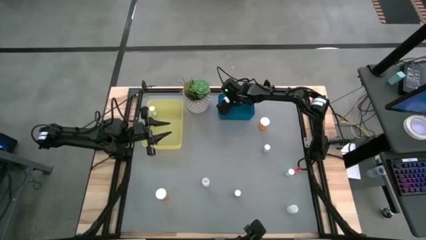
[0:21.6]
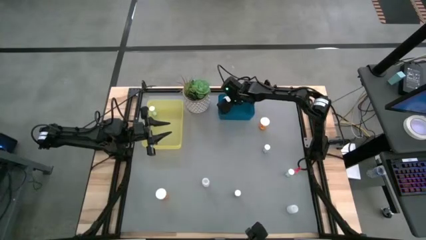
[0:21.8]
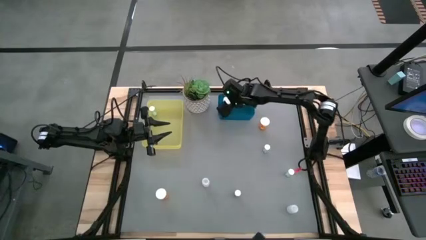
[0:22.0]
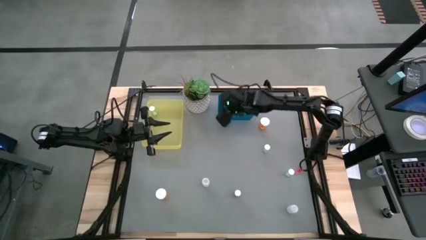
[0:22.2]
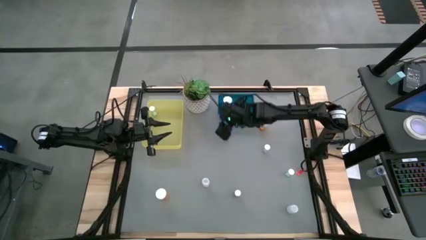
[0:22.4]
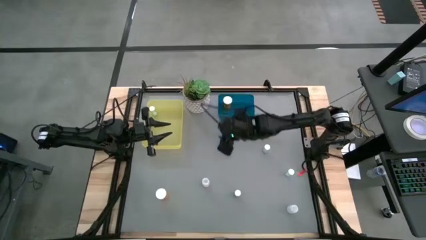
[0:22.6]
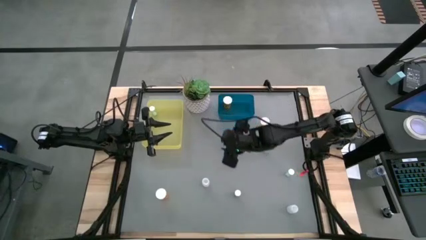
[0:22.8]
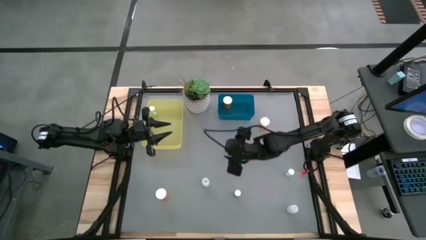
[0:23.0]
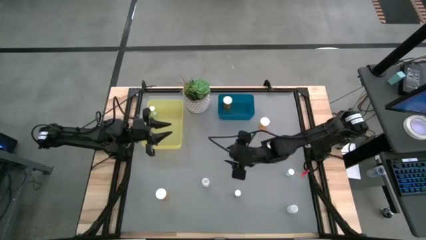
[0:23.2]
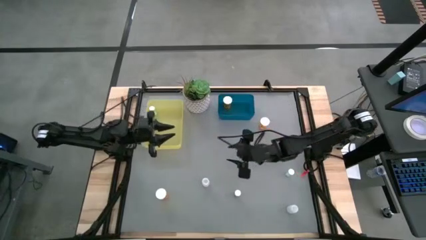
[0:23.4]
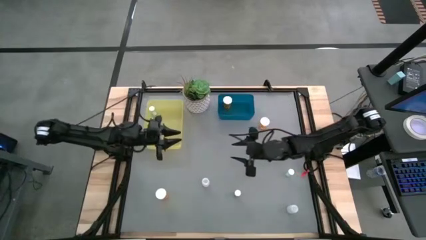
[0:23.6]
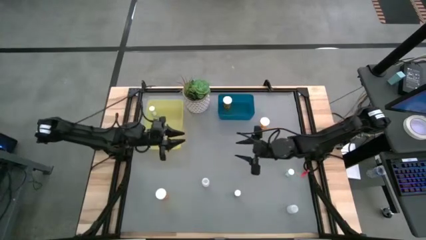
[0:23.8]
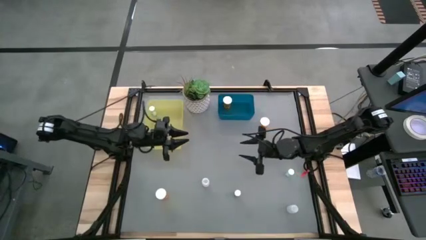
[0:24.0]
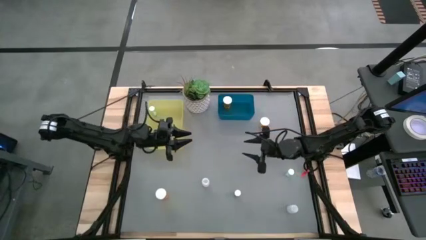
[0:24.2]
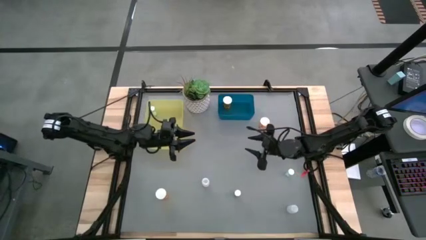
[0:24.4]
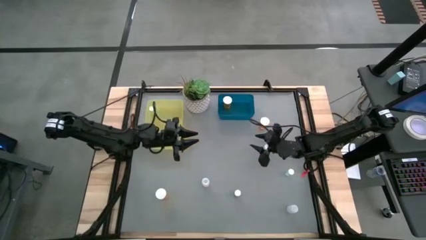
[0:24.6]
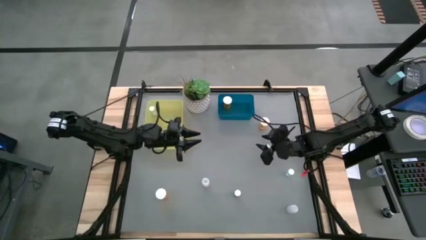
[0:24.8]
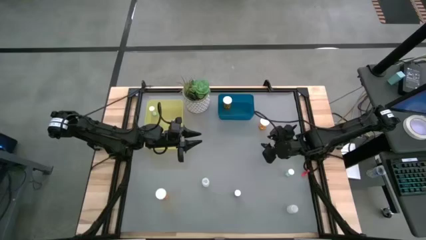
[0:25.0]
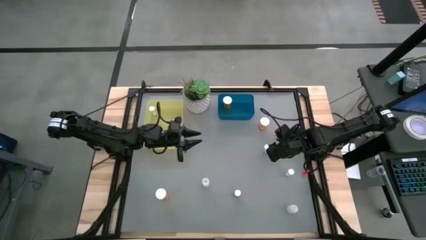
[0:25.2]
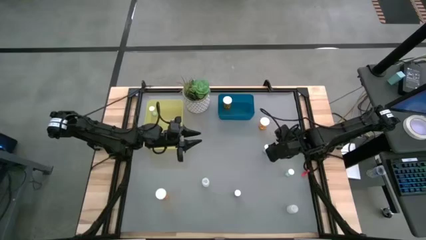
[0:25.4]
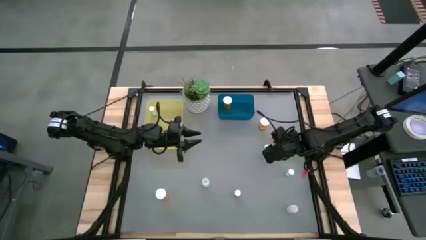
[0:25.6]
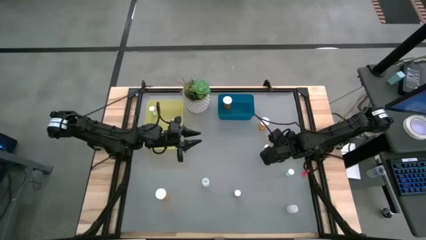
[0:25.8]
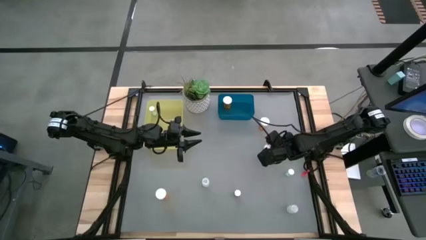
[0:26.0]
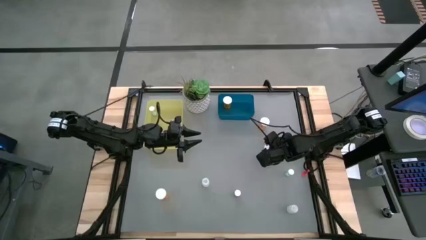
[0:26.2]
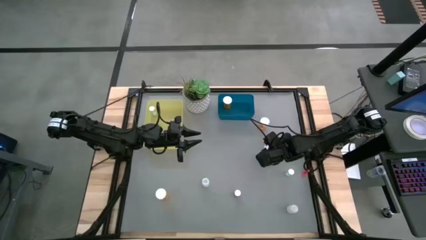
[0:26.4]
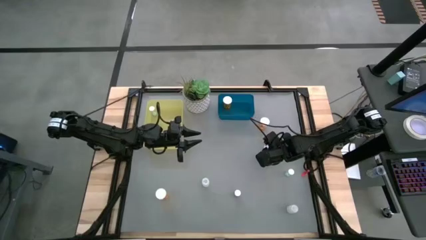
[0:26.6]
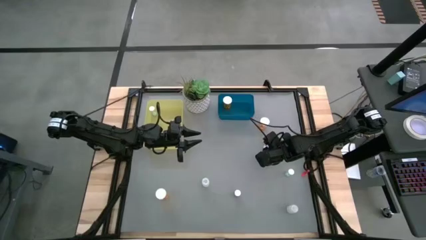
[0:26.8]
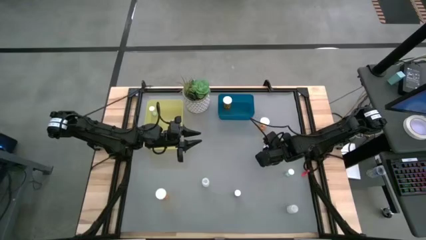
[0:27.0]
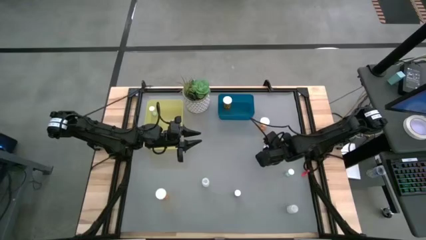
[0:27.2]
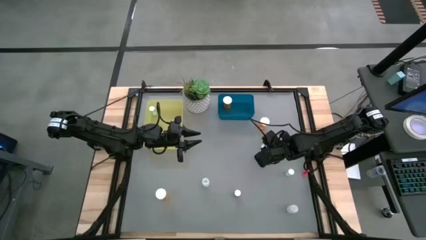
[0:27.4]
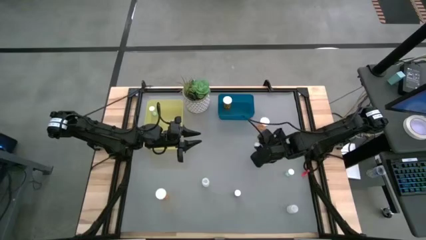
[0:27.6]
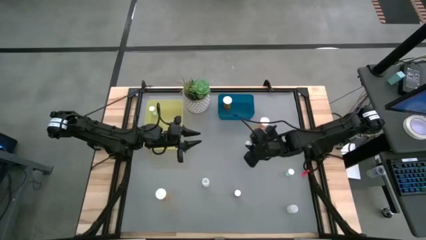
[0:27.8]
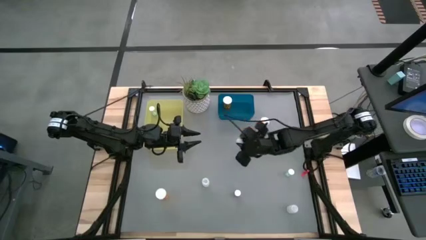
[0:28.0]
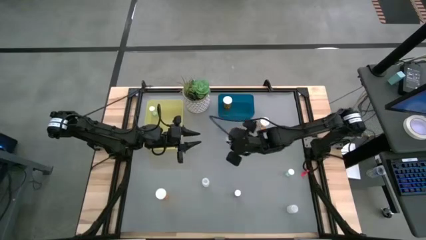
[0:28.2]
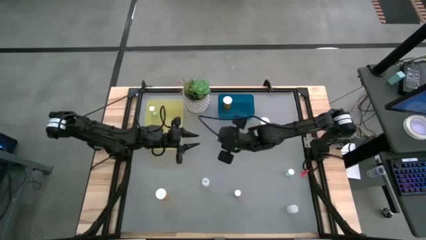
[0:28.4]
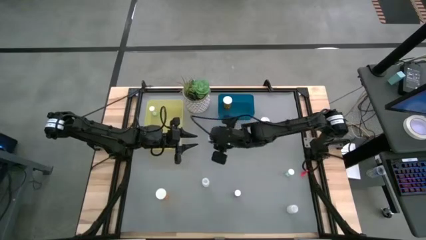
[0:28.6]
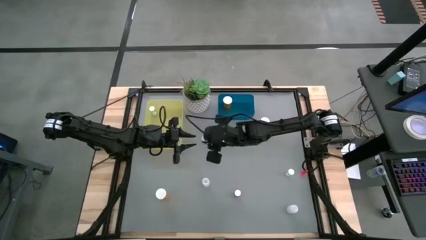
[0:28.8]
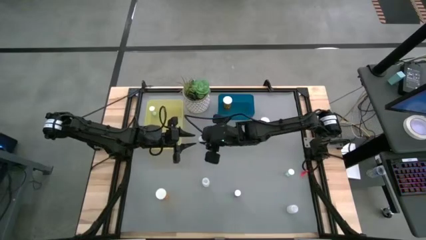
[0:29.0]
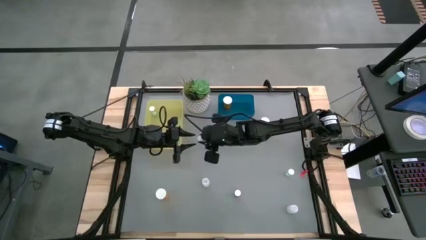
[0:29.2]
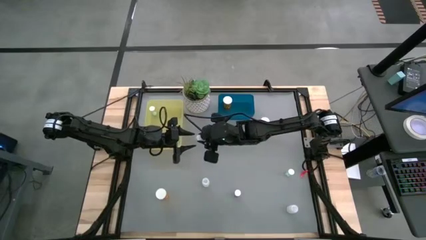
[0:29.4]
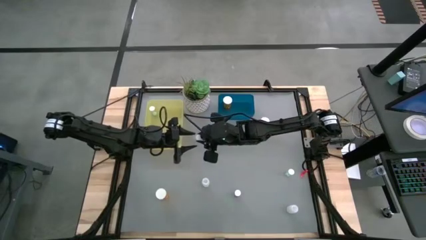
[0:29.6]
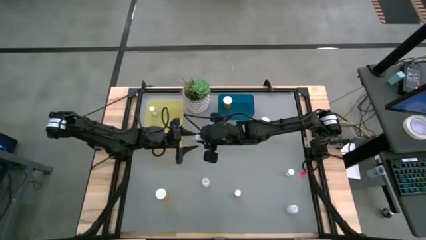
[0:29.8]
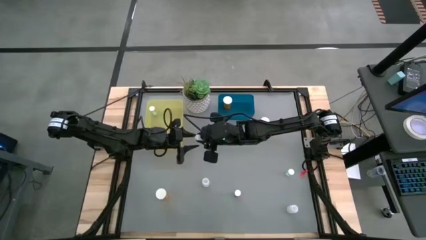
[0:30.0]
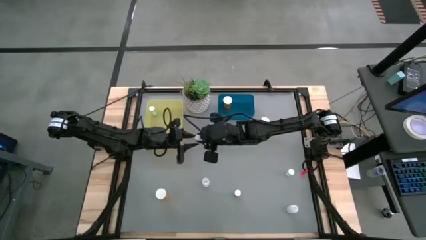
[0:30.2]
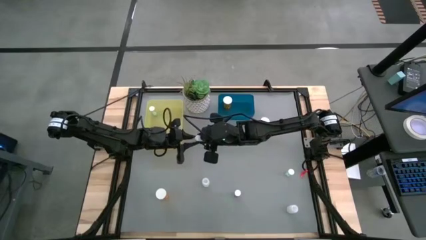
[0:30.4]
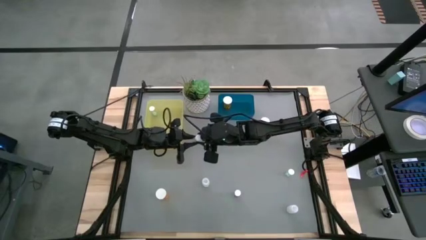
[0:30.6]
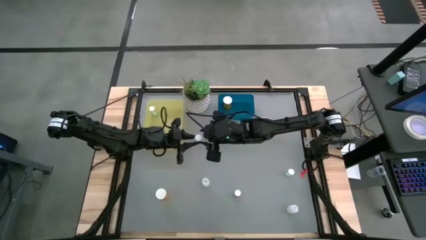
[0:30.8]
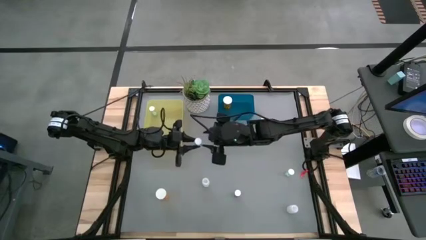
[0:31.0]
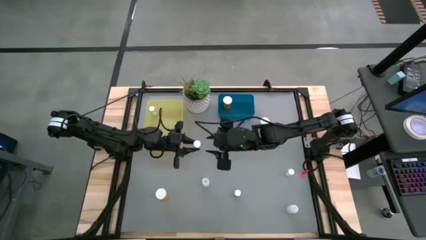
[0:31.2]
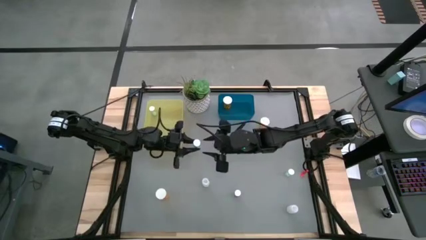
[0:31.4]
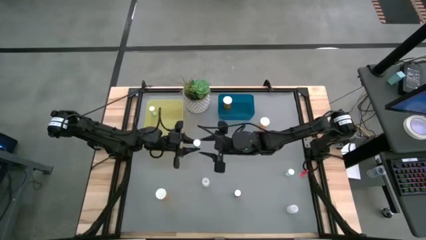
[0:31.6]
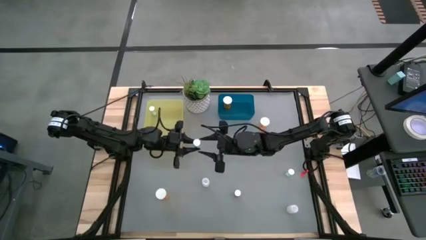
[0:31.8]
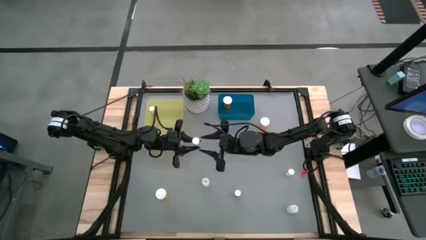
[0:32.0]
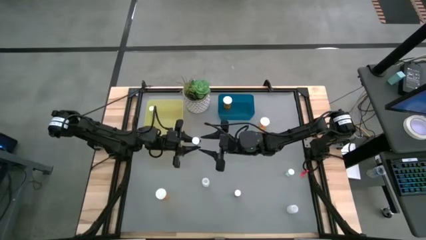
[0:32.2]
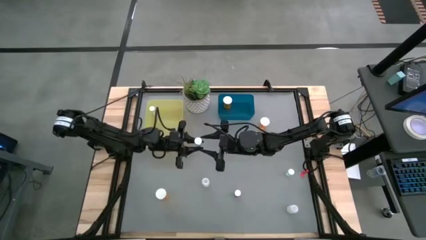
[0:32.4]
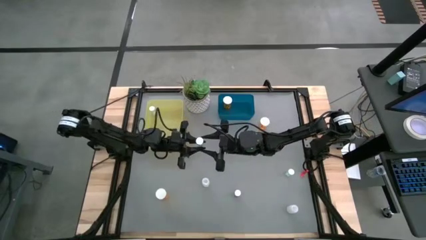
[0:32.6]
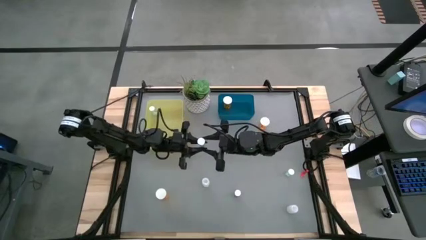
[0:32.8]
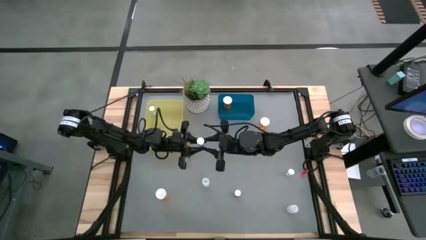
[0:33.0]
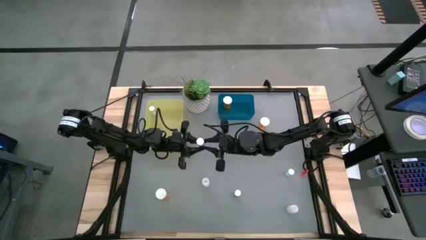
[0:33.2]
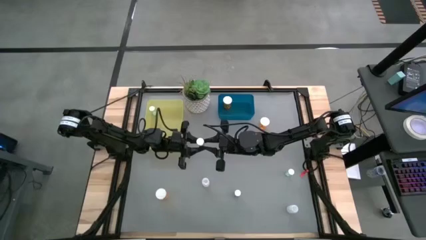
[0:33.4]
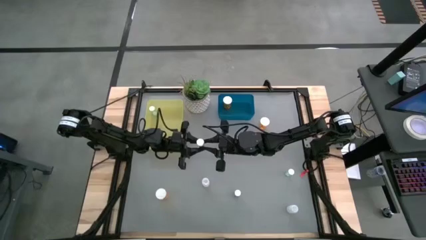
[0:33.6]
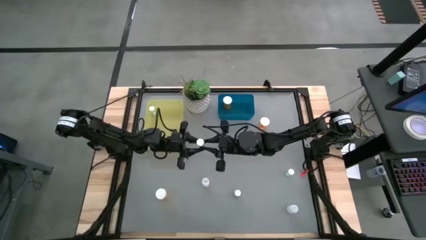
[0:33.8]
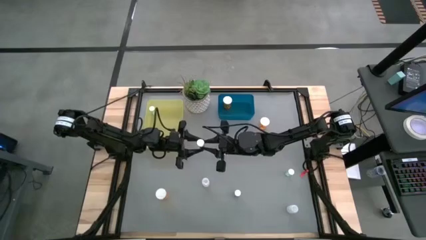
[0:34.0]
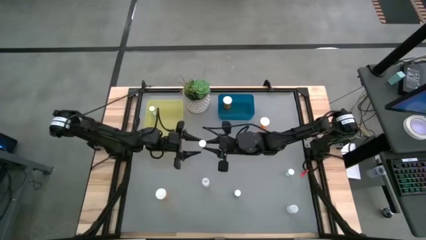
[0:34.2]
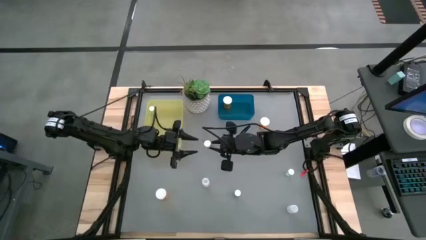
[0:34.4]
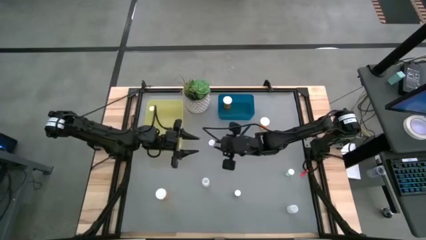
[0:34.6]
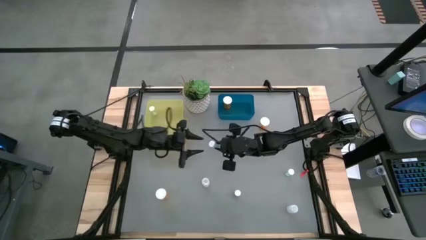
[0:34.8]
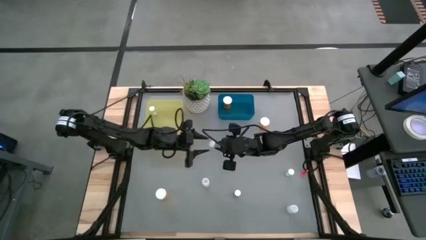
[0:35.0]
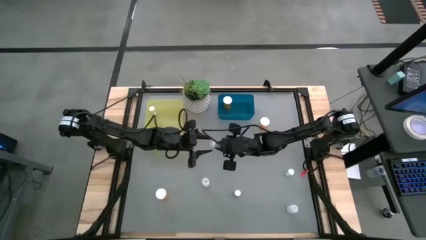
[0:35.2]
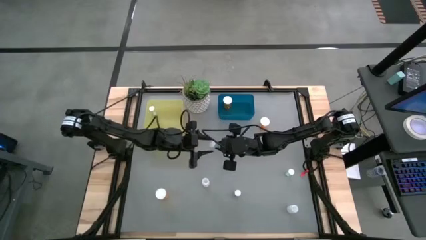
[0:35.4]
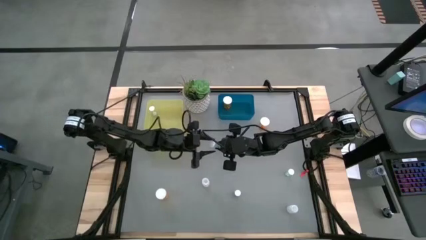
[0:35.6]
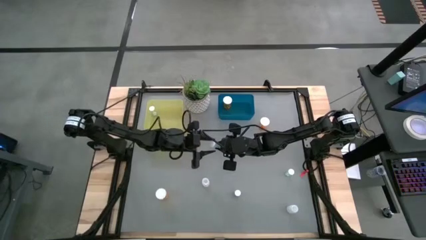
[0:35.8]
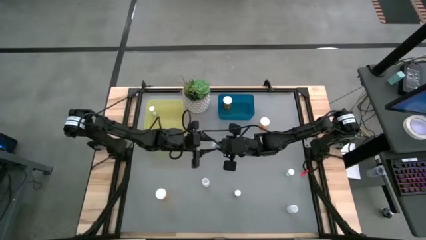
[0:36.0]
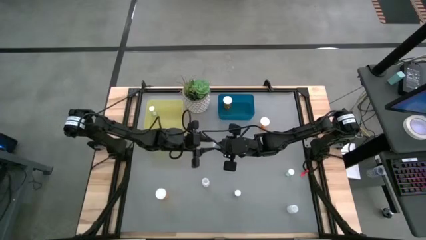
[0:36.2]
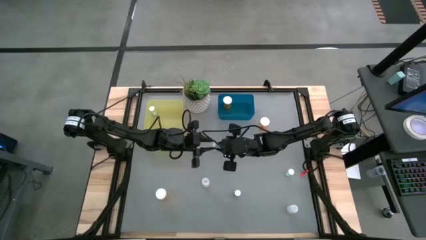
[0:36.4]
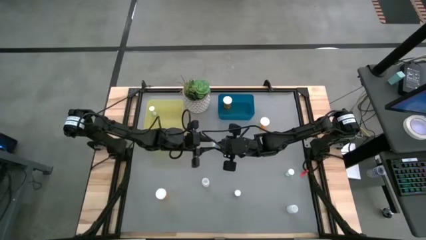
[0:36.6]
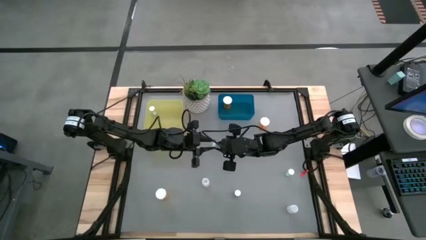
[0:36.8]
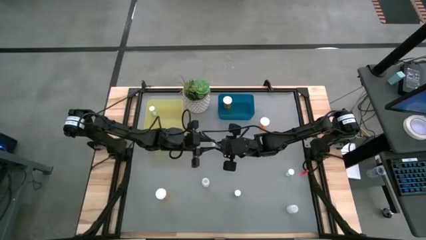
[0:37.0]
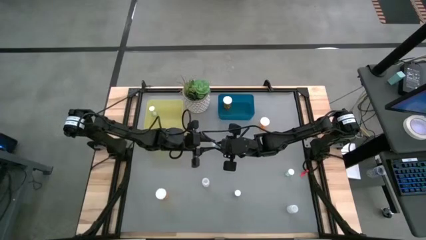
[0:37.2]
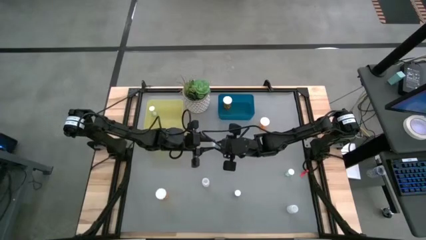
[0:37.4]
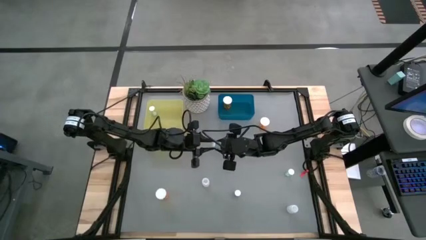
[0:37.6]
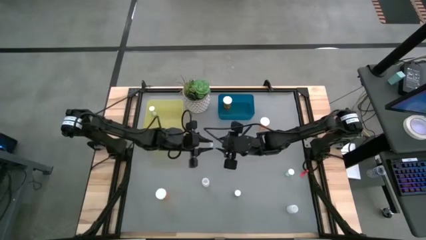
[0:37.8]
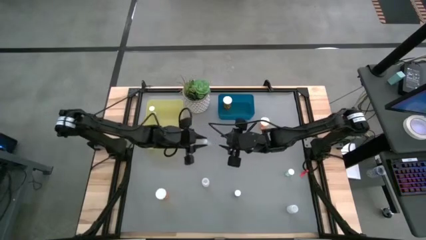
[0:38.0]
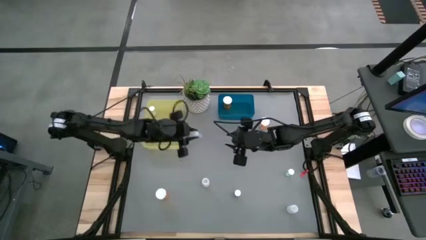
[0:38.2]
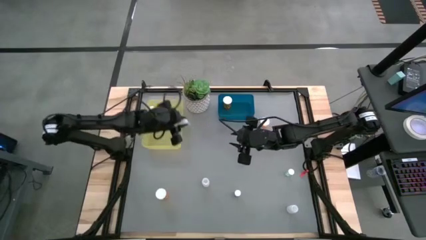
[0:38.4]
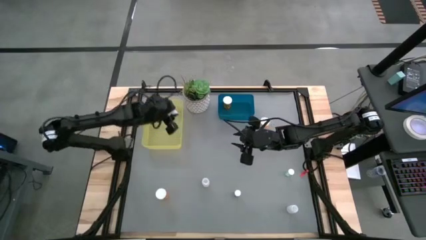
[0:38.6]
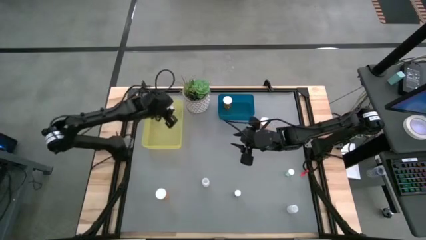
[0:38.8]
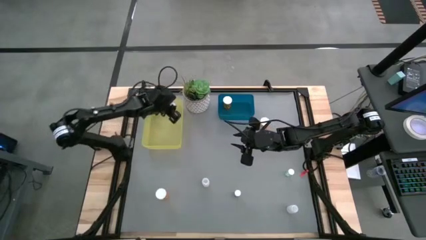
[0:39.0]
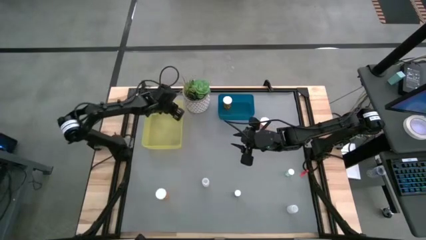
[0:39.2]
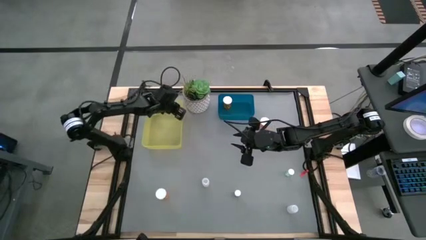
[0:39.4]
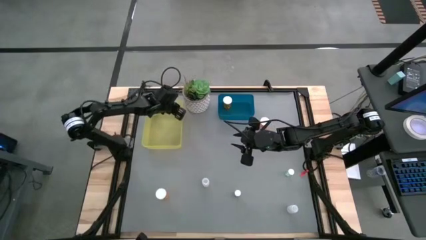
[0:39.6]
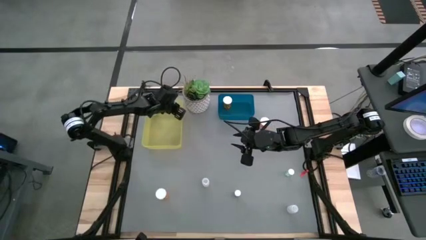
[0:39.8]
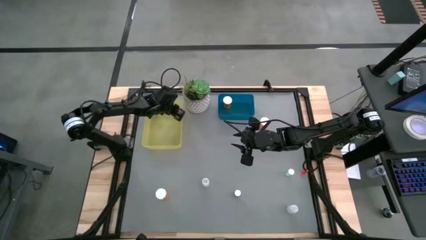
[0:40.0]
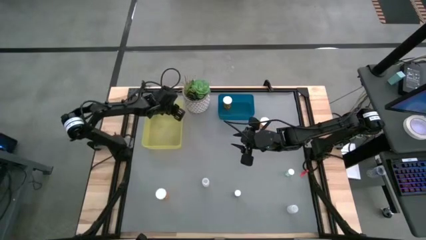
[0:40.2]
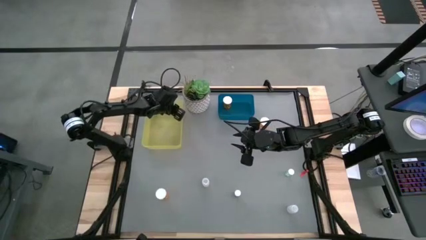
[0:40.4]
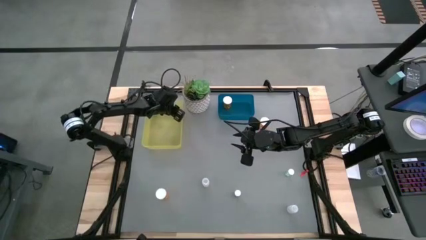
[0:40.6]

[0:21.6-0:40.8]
Task: Pick and place medicine bottles into bin by pill shape (circle, oval)
Put the blue tablet bottle into the yellow bin
